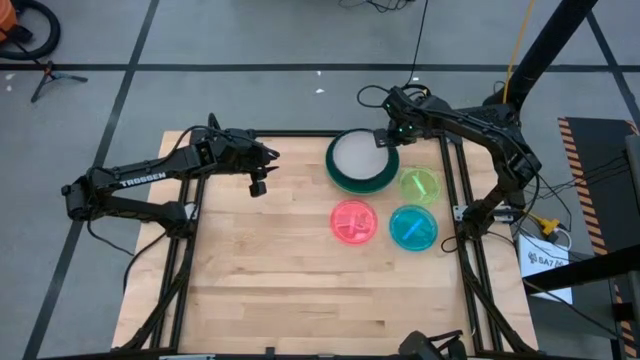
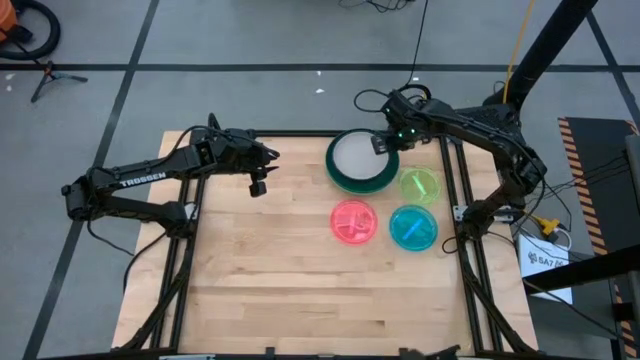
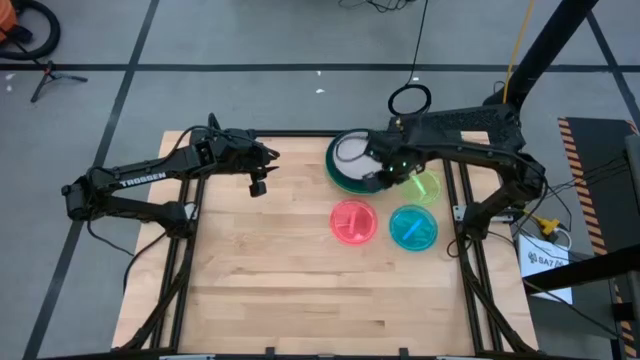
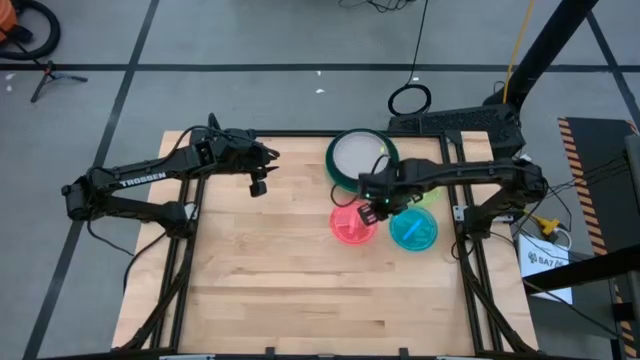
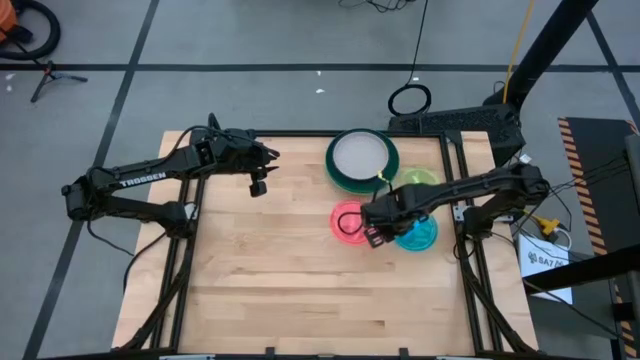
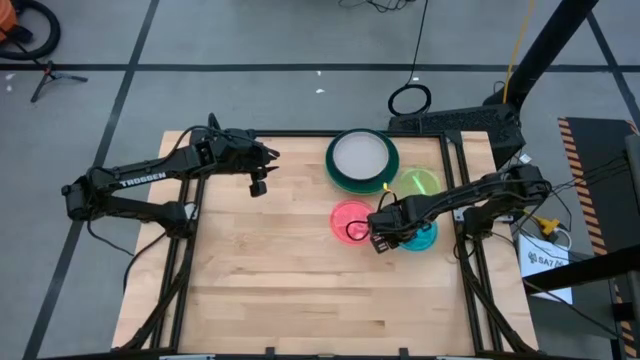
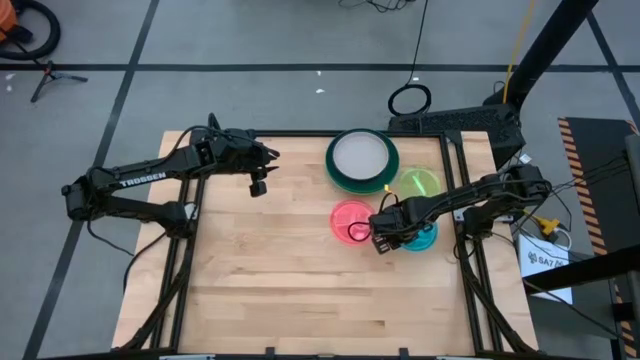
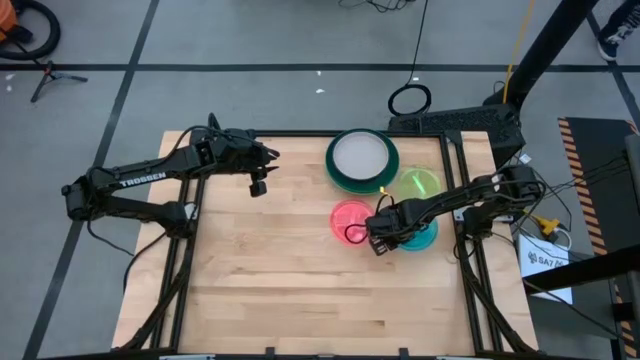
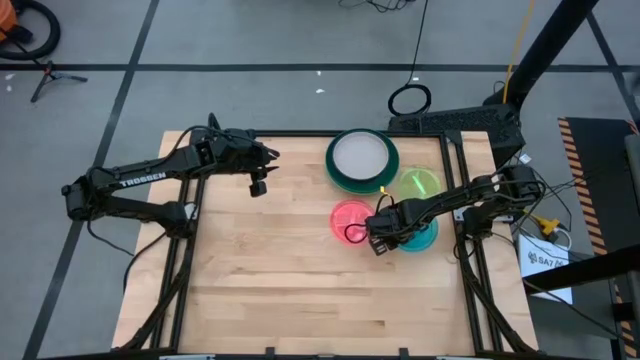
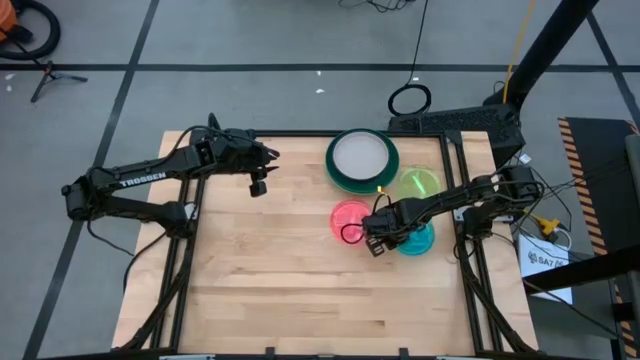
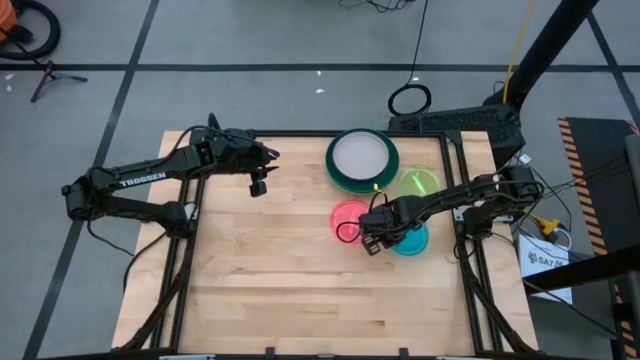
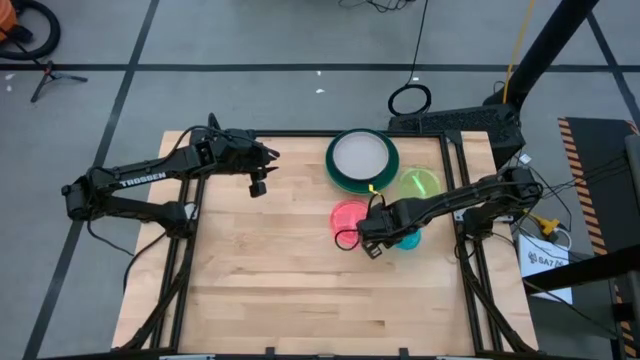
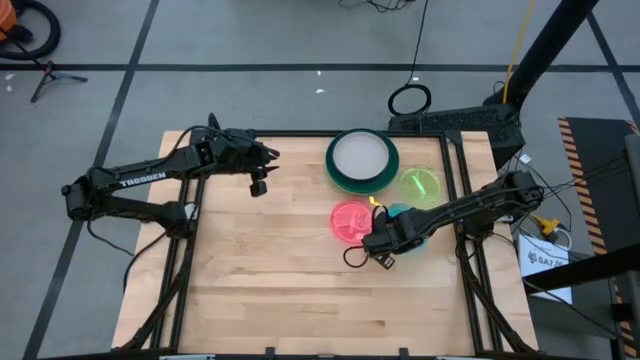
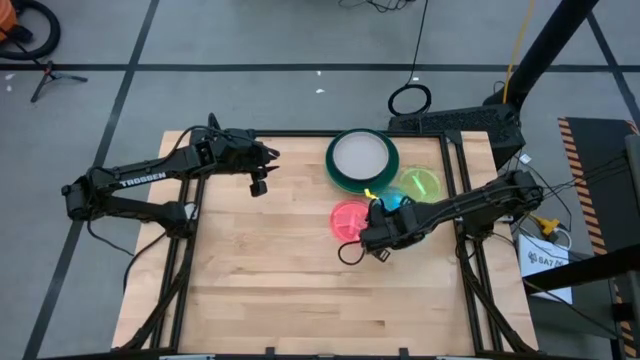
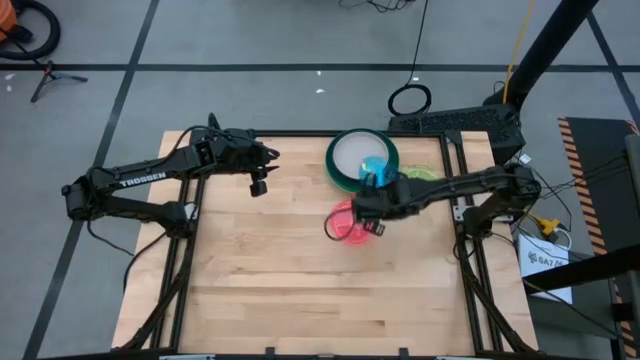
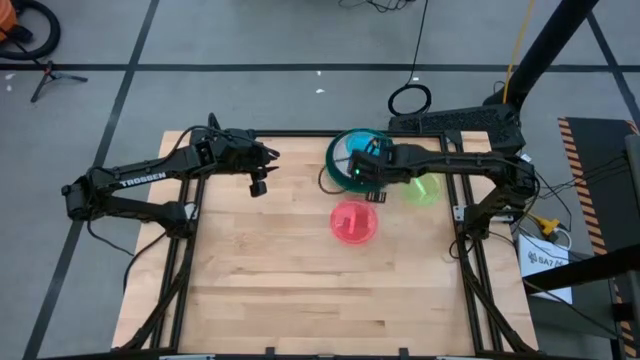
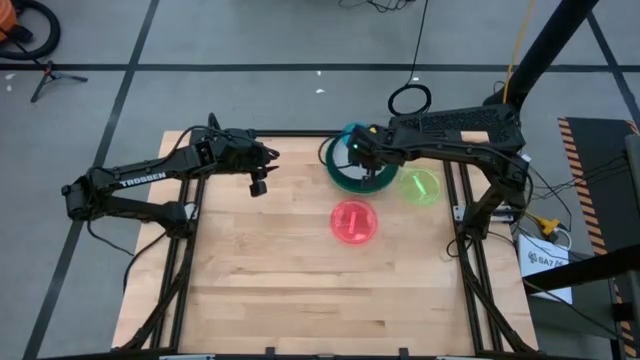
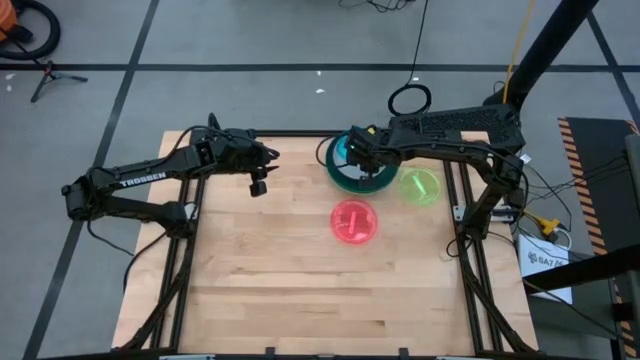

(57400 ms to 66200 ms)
Task: Stack plastic plates
Stack the blue plate on top of the gray plate

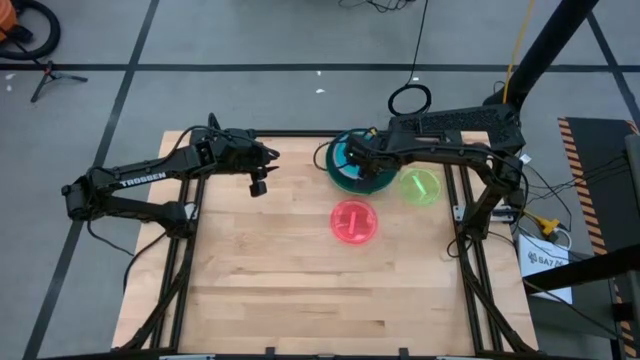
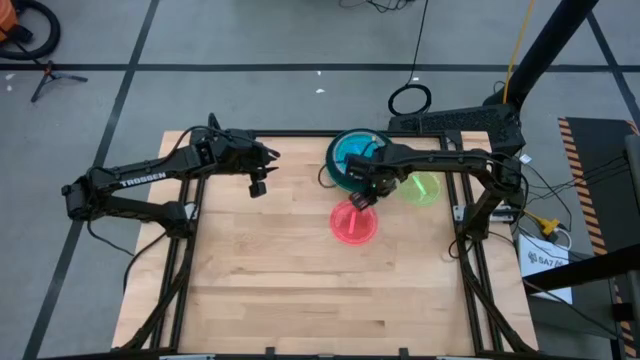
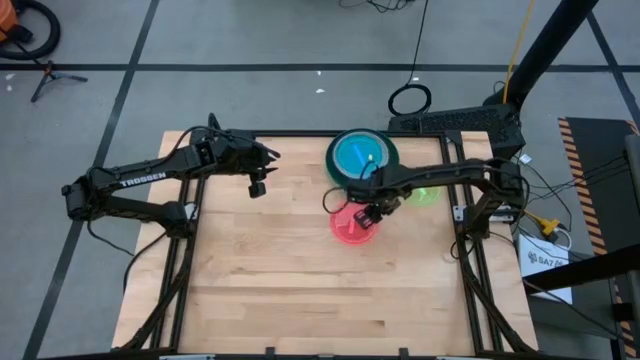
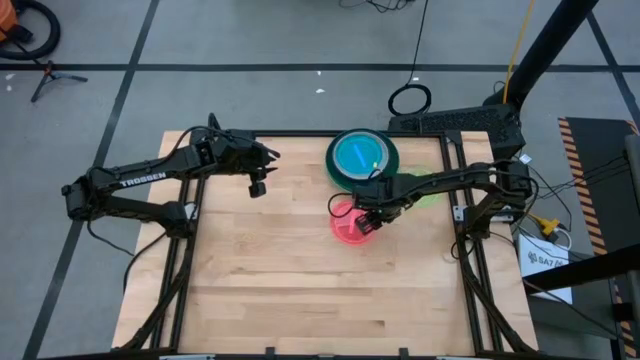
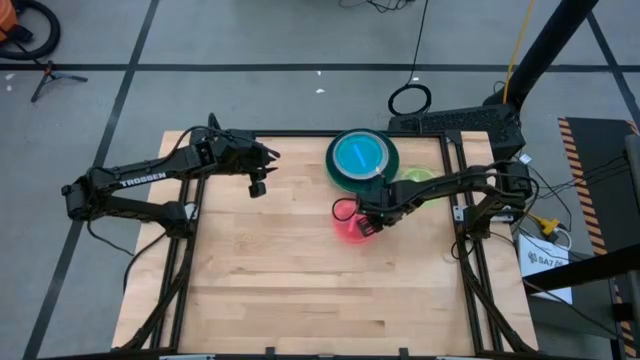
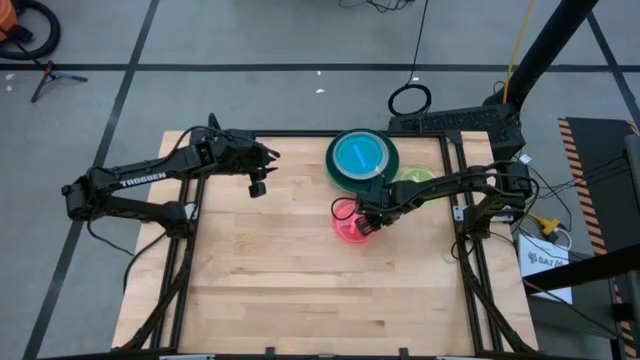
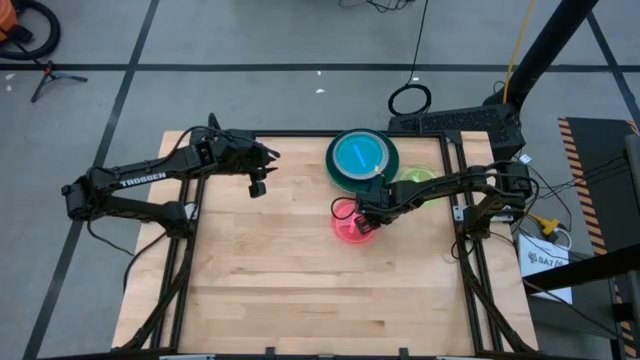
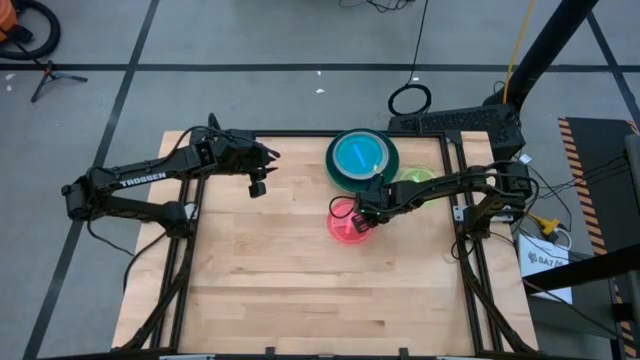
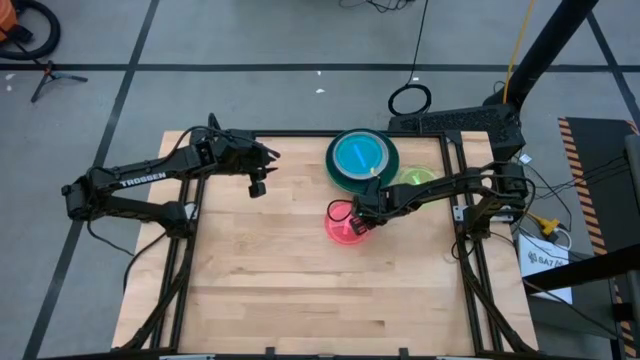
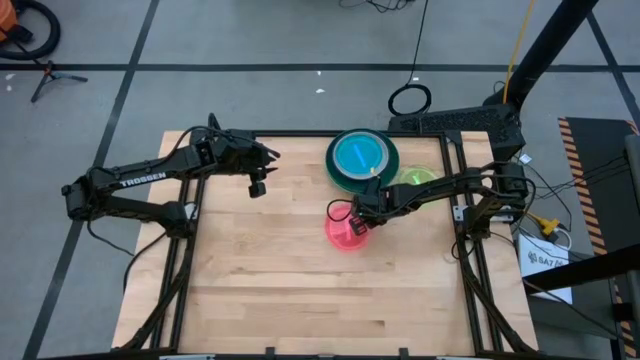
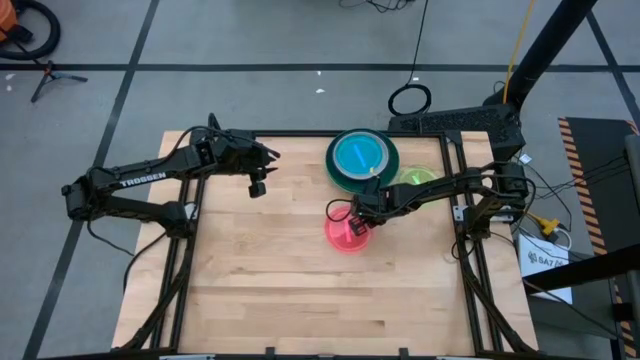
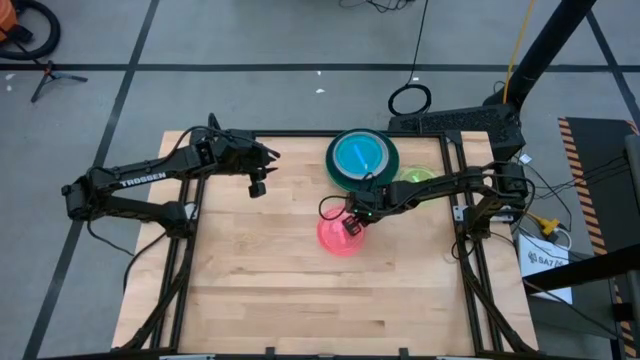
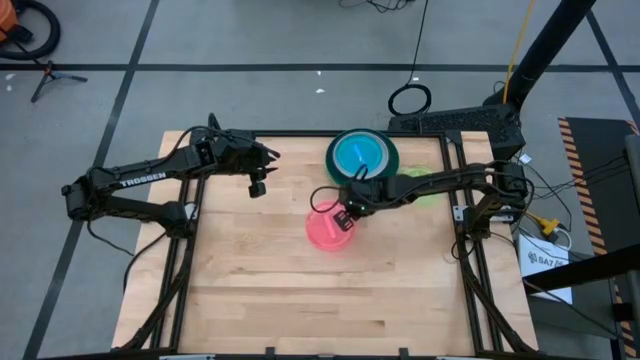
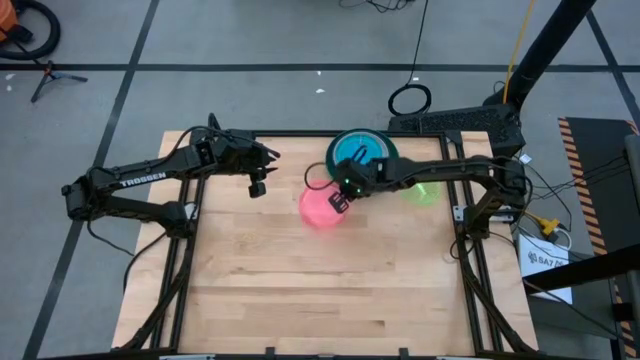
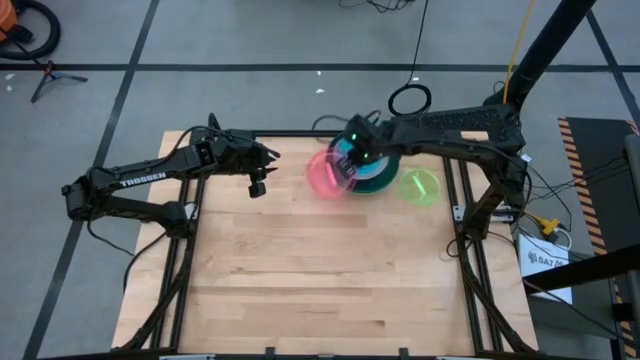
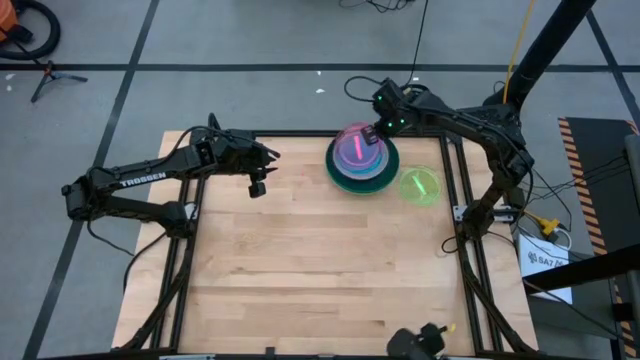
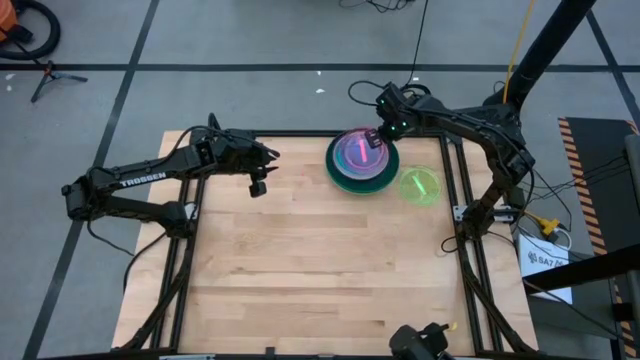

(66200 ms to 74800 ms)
Stack the pink plate on top of the blue plate

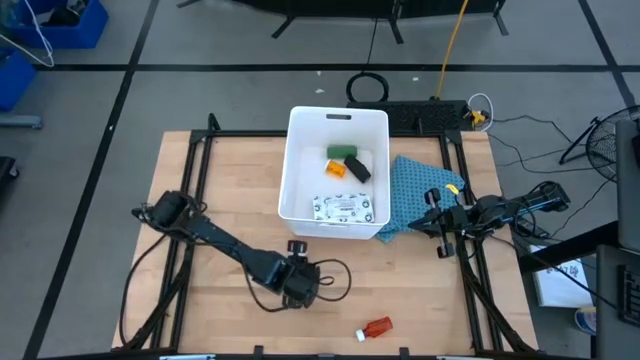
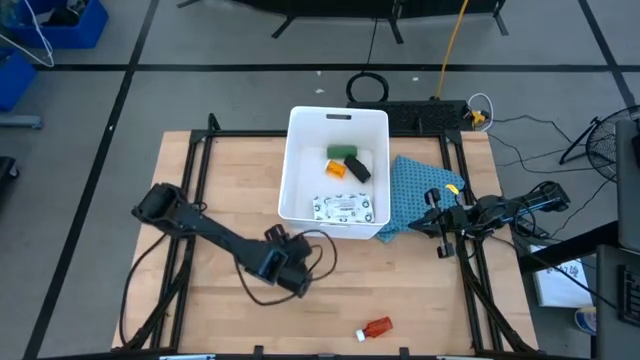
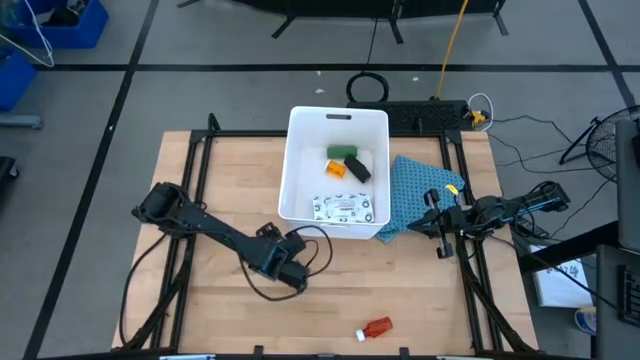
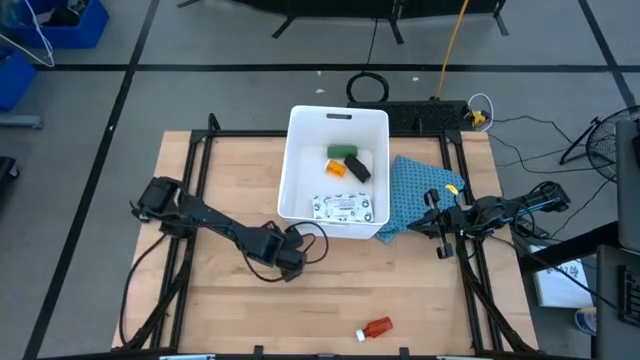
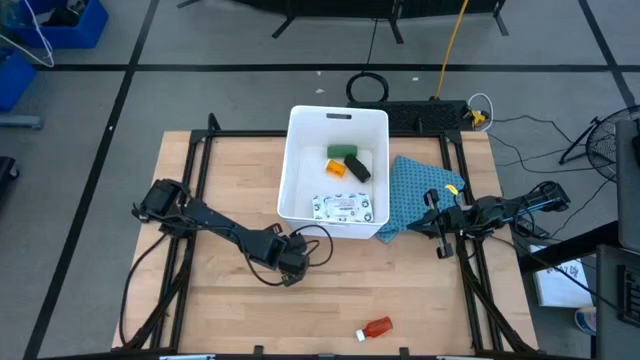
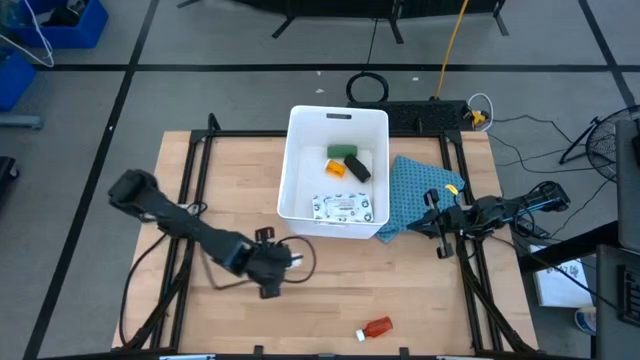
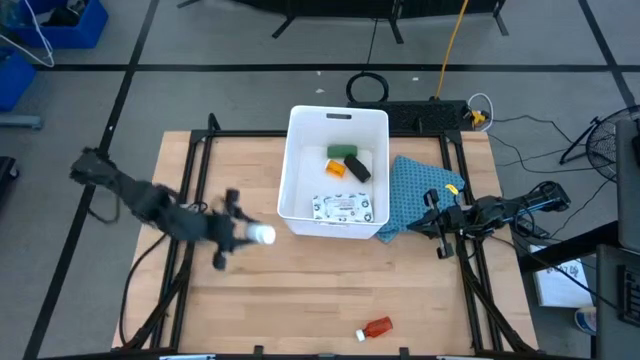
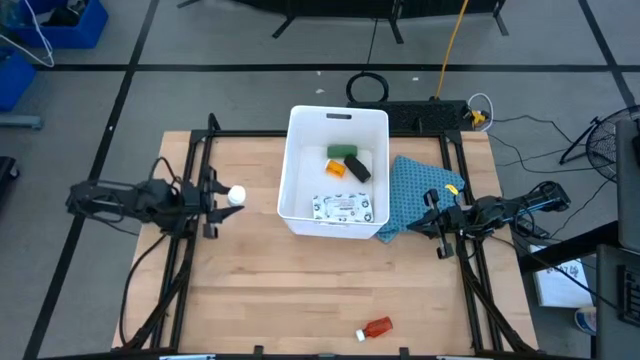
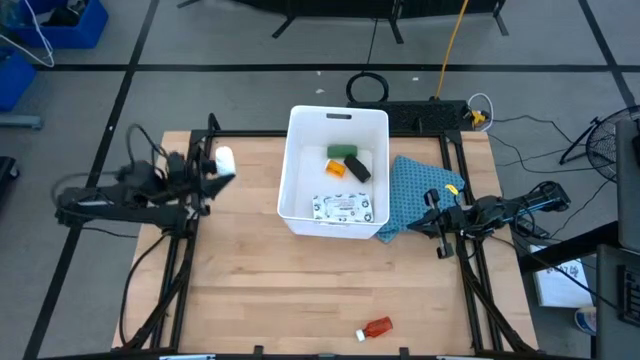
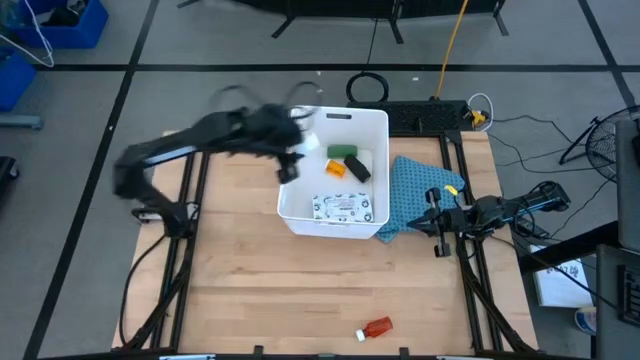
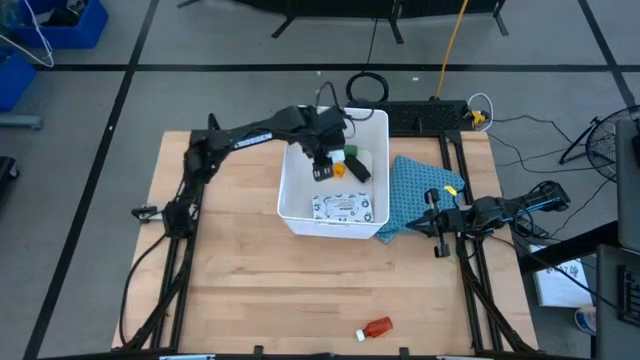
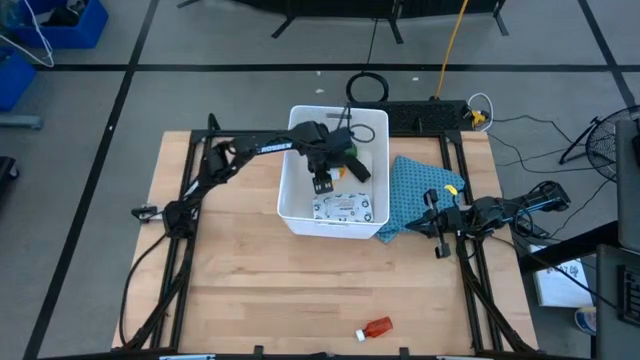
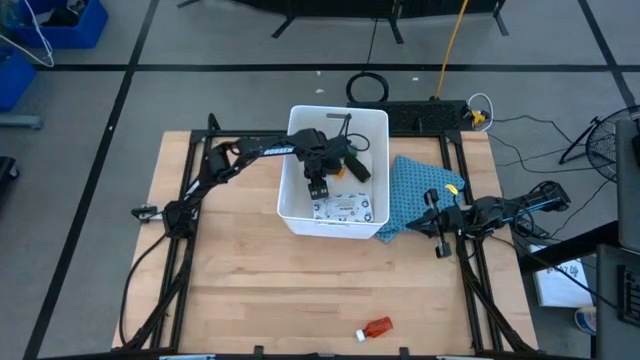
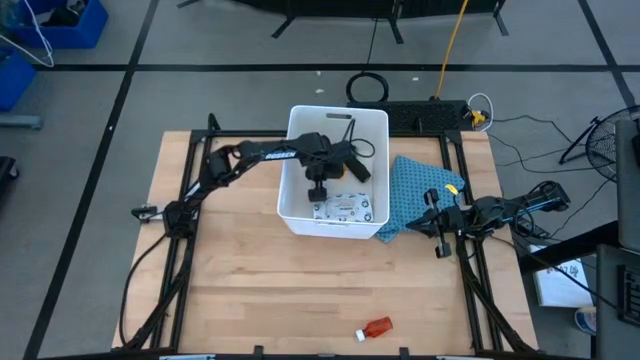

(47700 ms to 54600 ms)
Task: Pick & place medical supplies in basket/bin
Put the white medicine bottle into the bin
